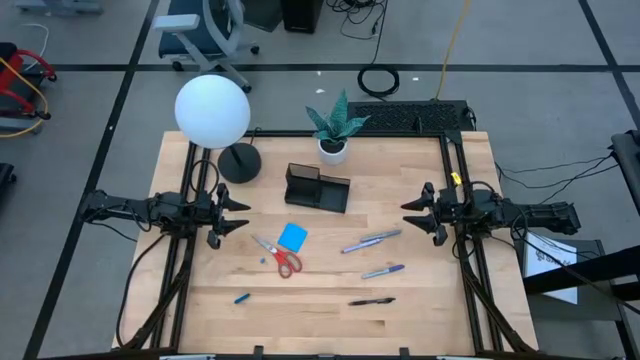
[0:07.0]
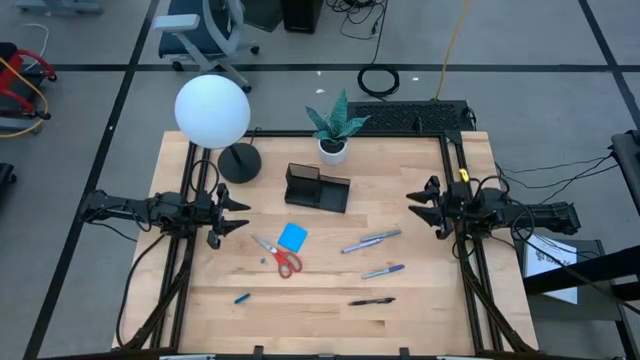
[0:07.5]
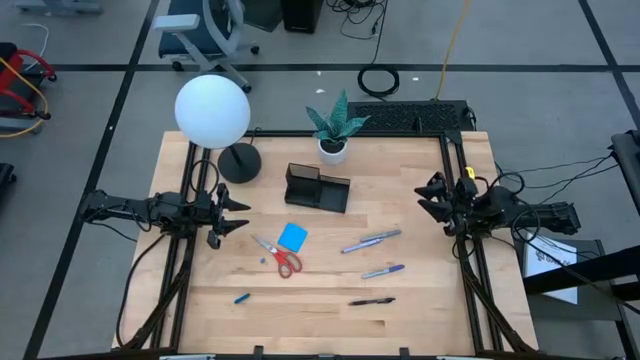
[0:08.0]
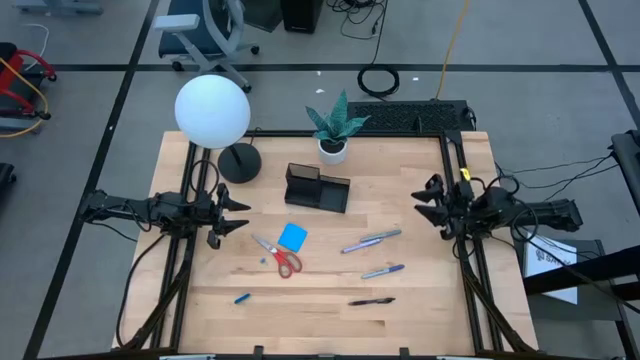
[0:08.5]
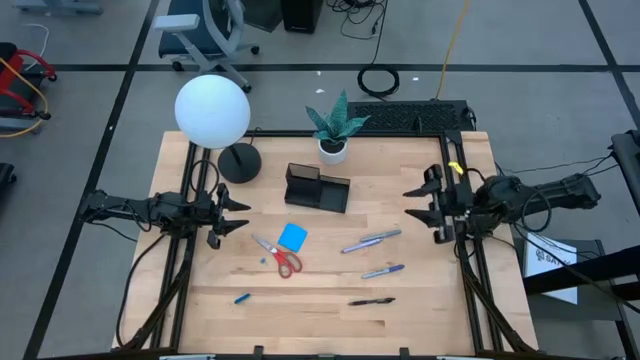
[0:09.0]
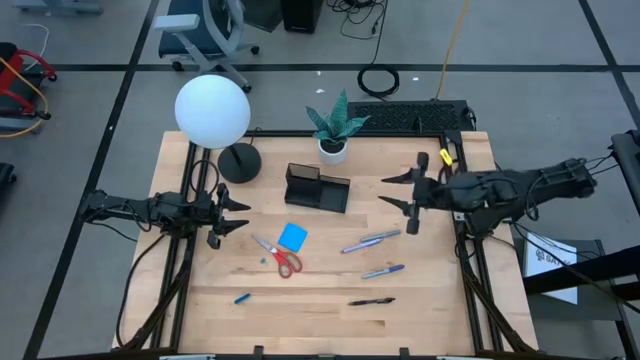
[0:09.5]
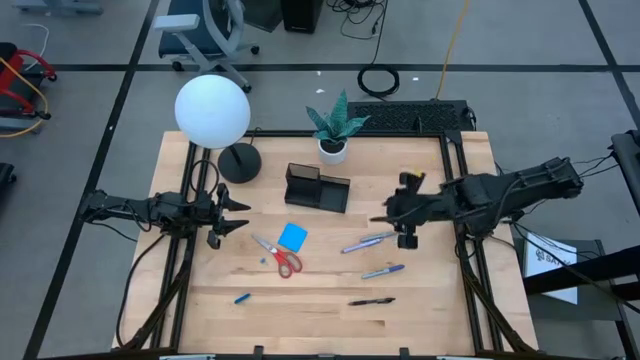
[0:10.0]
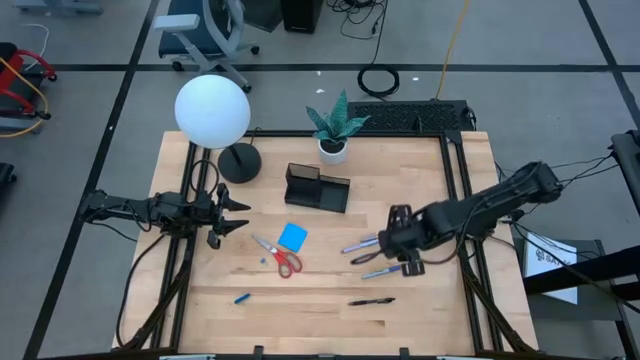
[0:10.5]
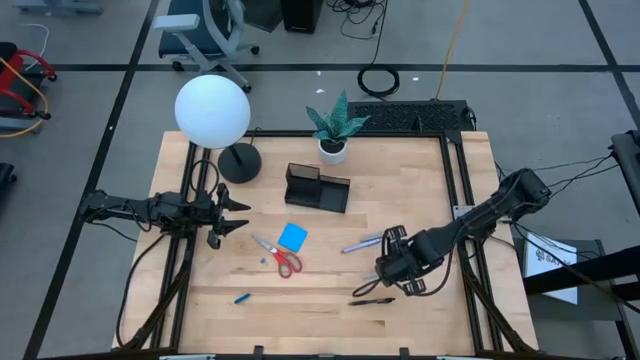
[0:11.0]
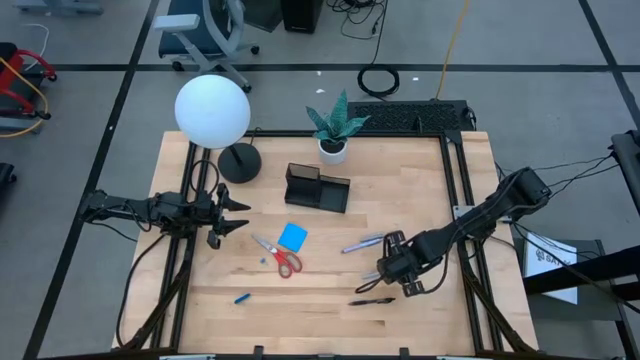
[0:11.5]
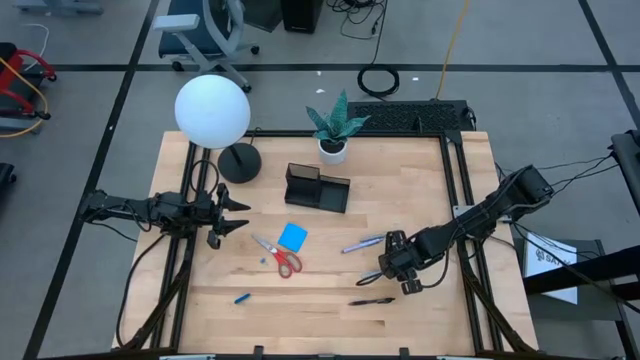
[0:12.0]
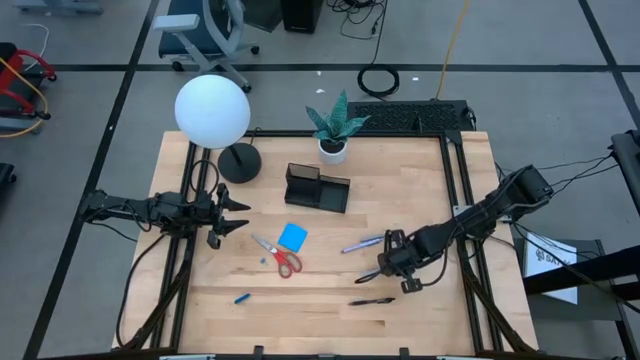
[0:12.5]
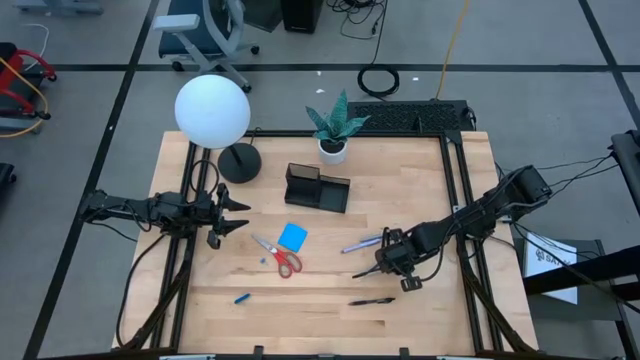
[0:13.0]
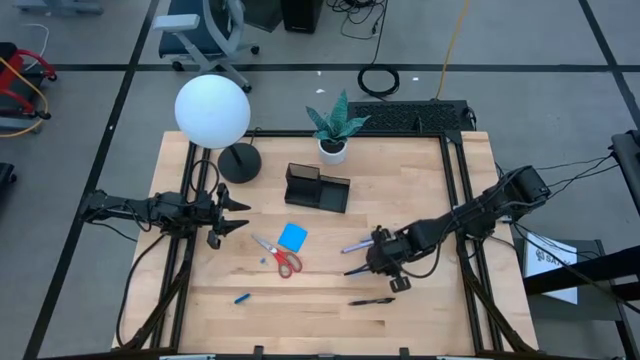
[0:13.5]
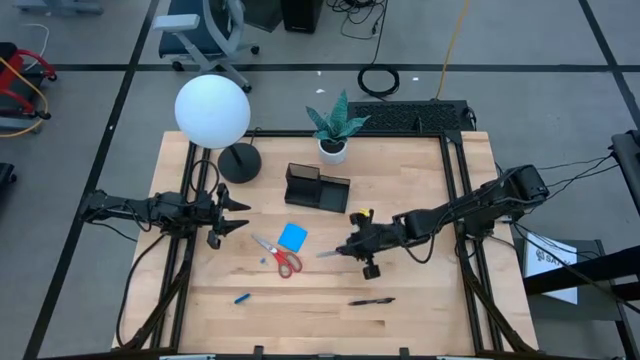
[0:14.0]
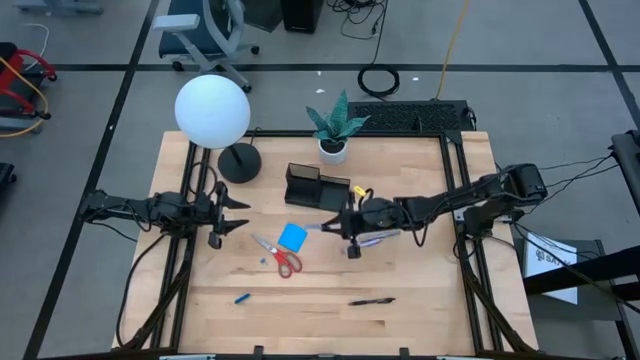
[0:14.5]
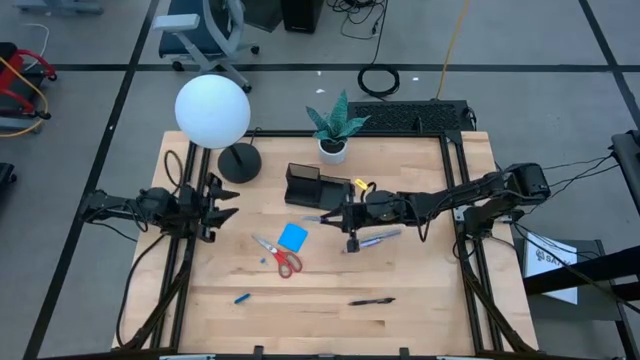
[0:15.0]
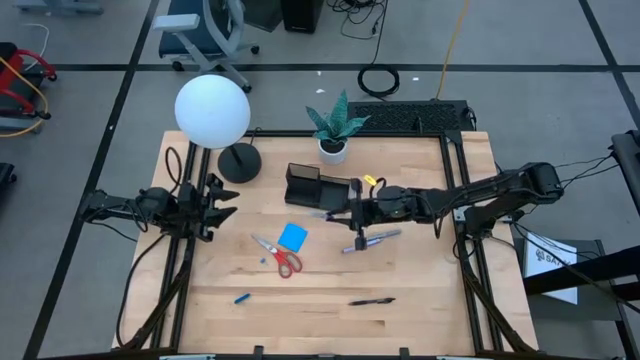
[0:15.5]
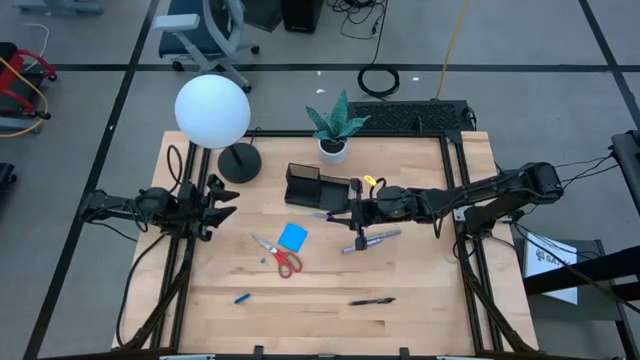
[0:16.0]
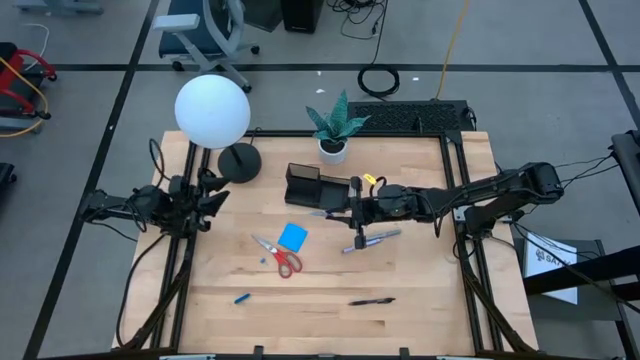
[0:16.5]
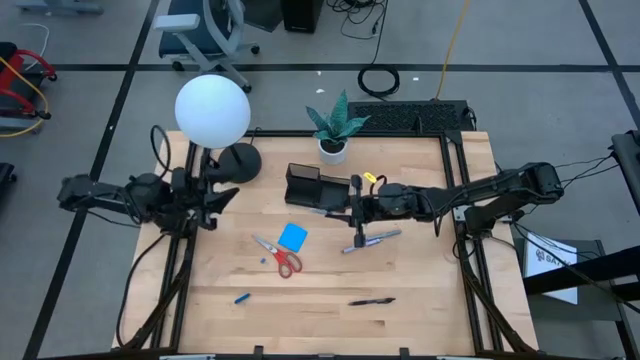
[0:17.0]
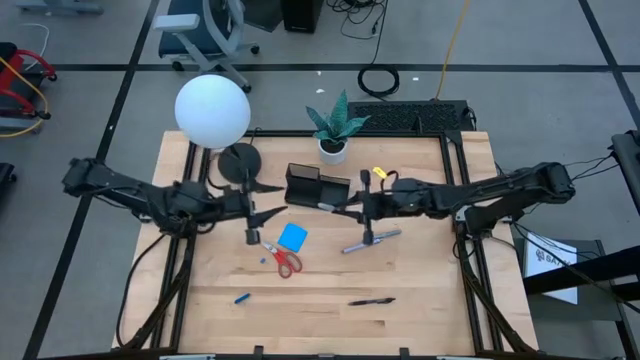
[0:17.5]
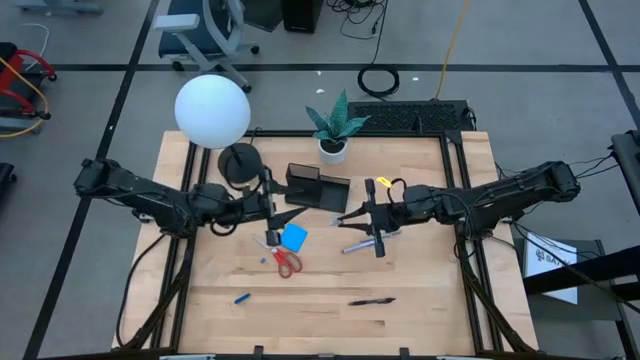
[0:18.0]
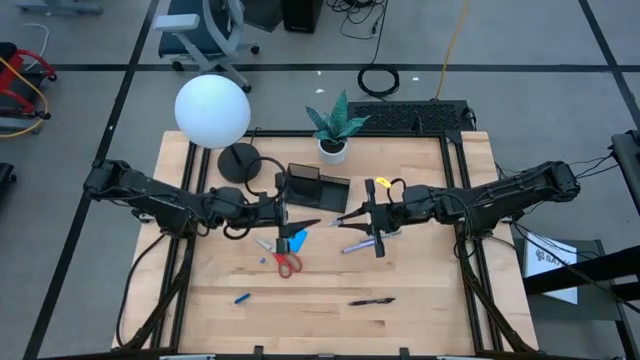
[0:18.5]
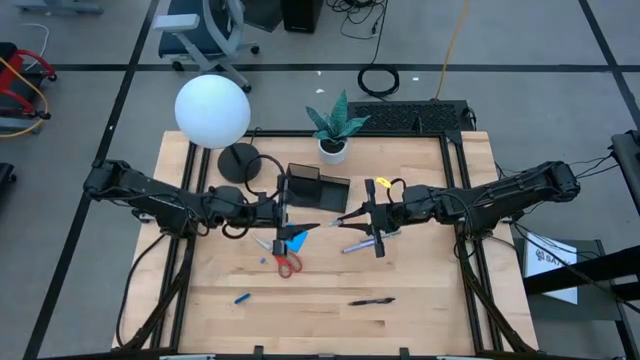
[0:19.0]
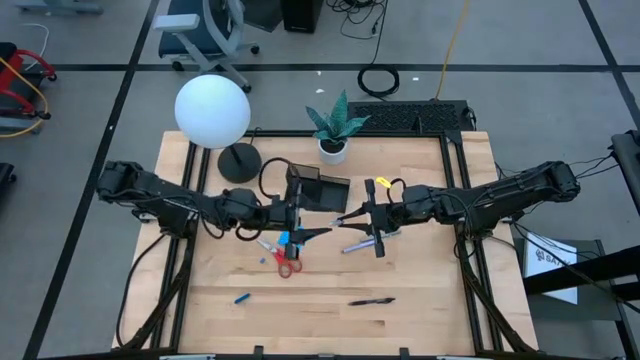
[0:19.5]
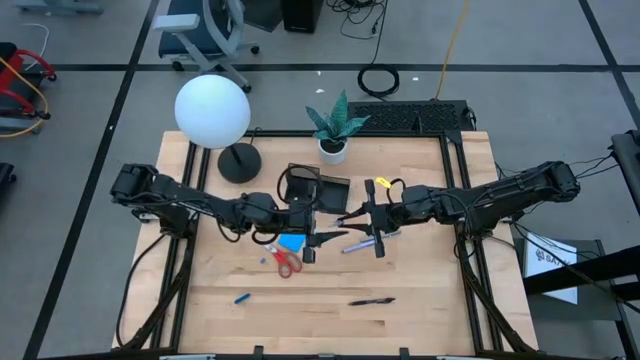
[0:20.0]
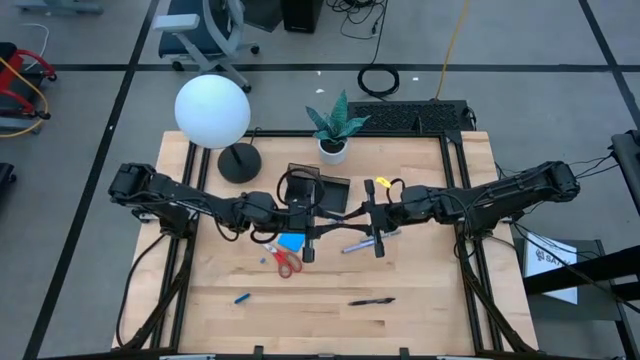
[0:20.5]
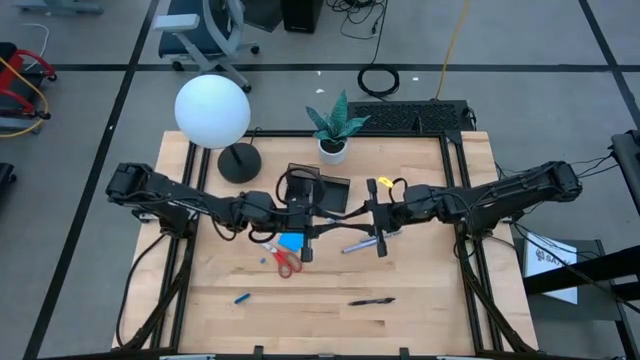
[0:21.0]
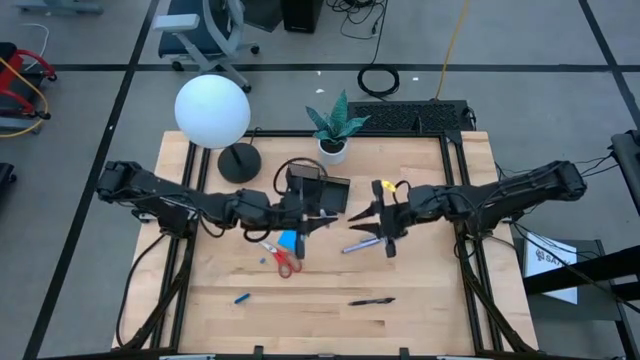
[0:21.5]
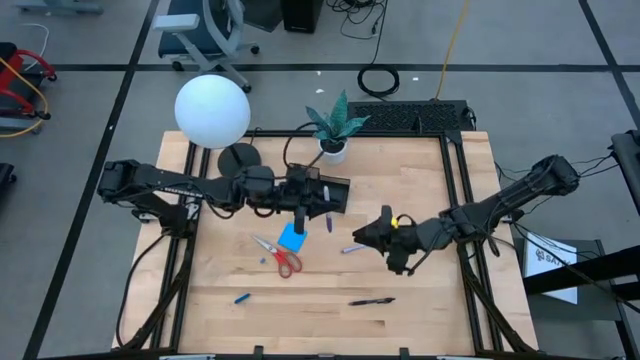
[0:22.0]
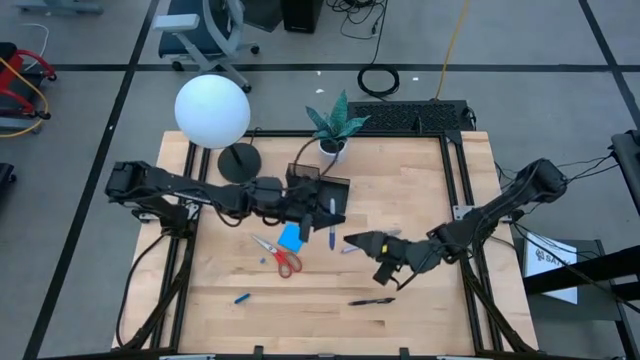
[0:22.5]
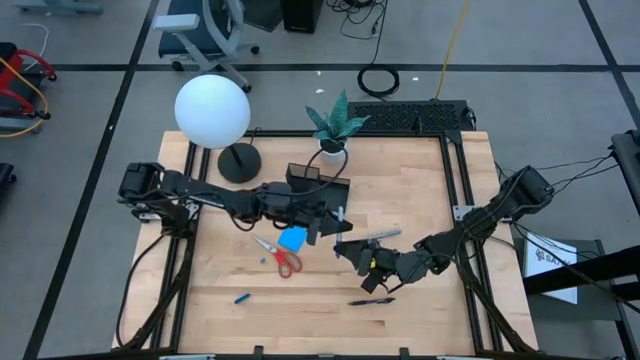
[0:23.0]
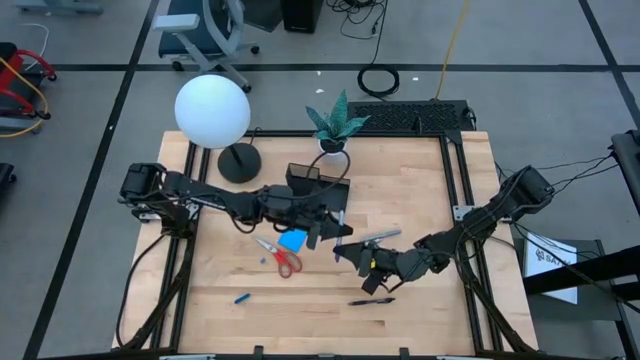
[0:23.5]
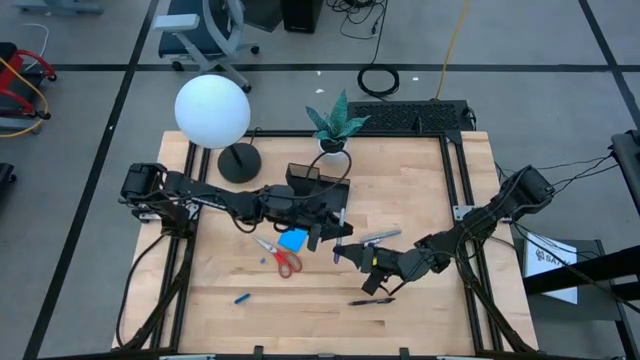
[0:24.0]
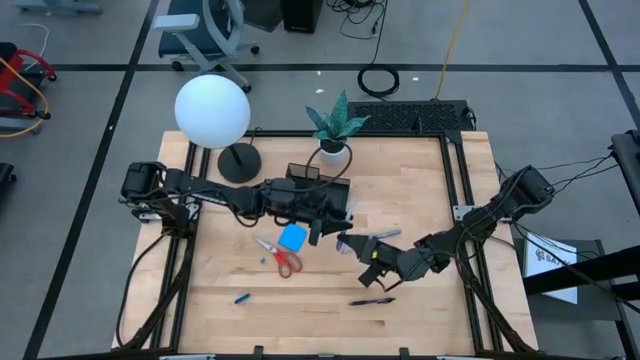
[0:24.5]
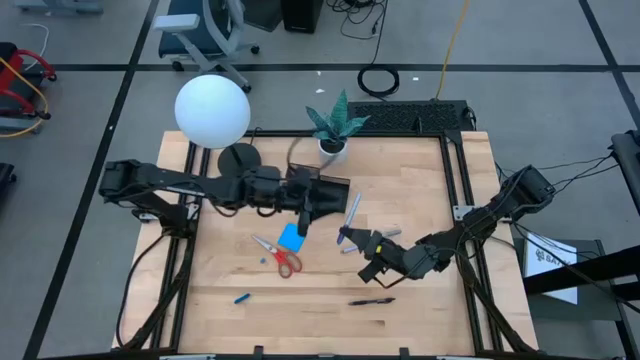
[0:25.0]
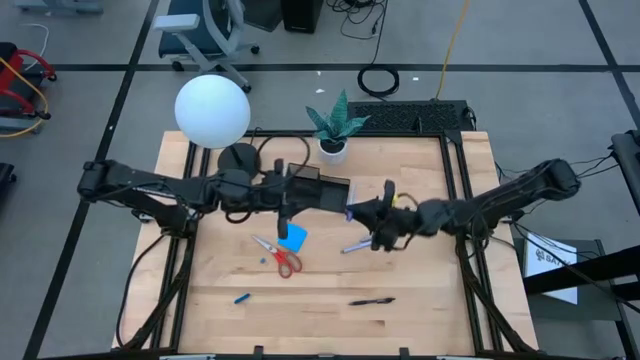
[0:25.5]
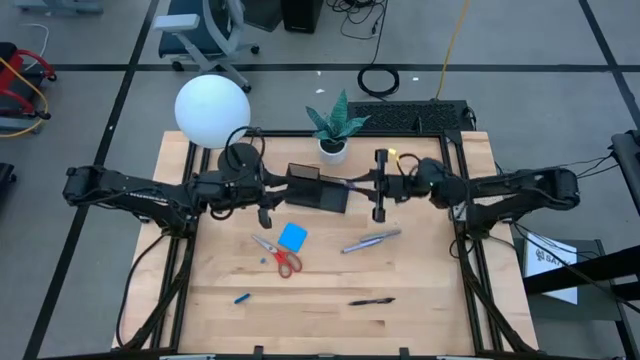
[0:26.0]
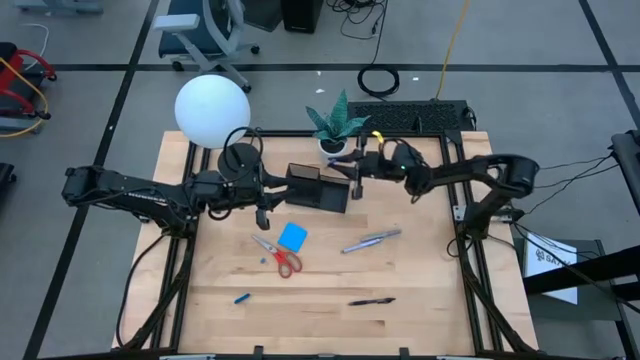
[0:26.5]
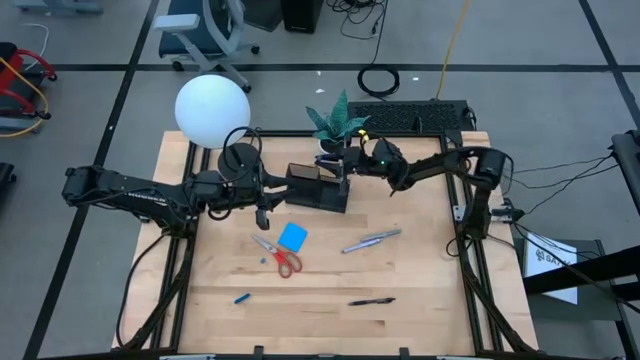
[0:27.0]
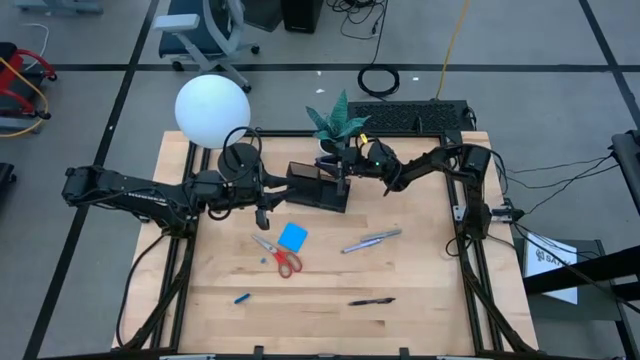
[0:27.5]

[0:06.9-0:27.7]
Task: Pick and place office supplies into organizer
Put the blue pen into the desk organizer
